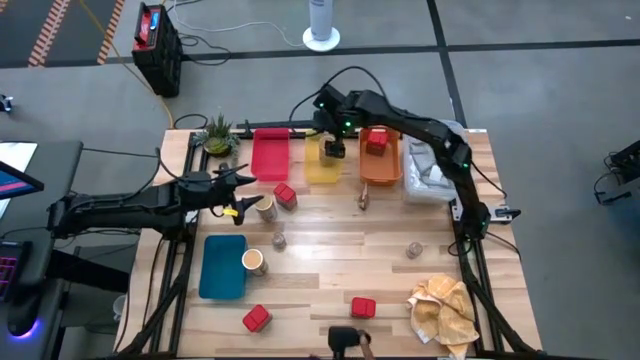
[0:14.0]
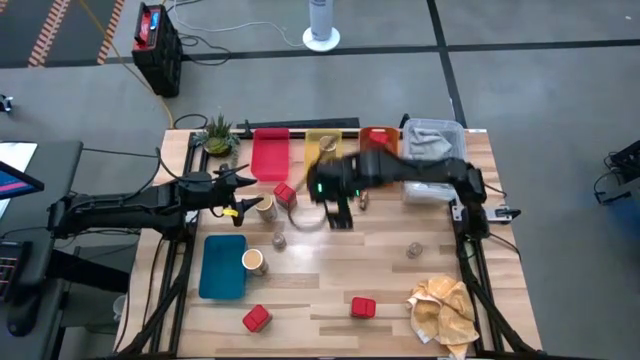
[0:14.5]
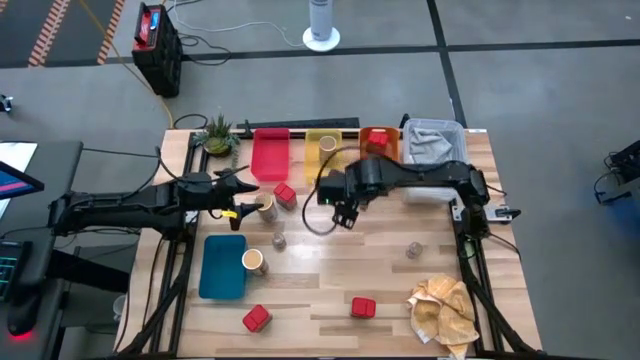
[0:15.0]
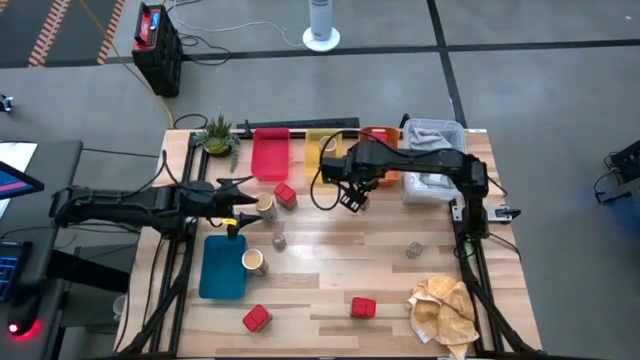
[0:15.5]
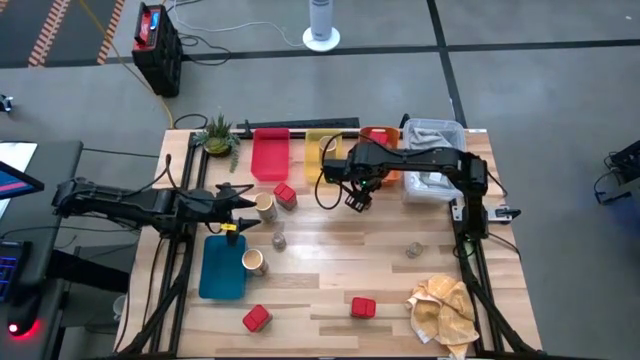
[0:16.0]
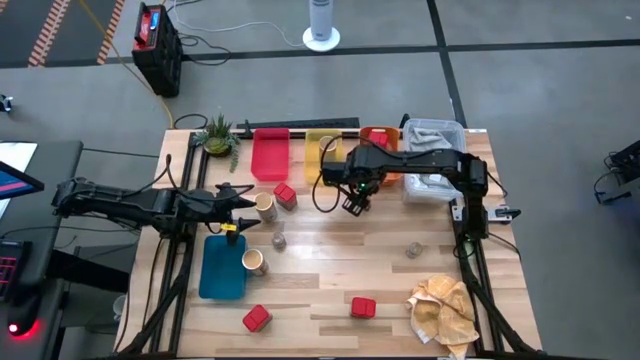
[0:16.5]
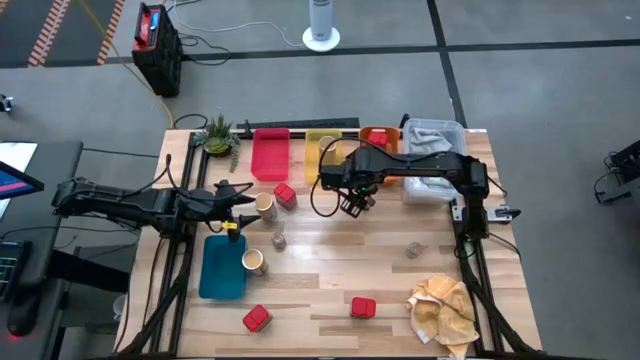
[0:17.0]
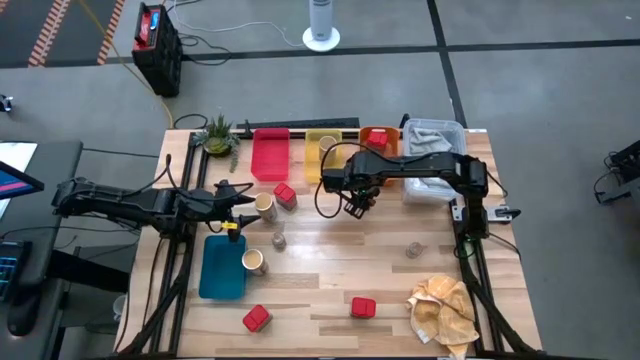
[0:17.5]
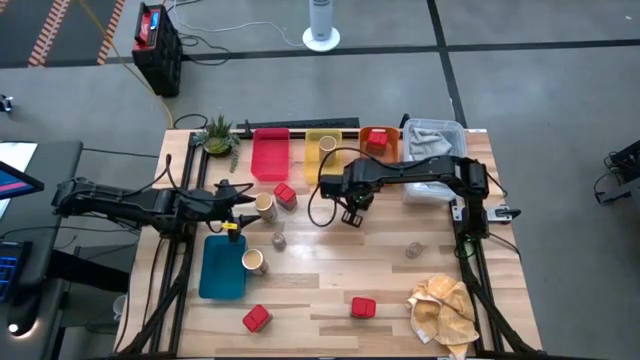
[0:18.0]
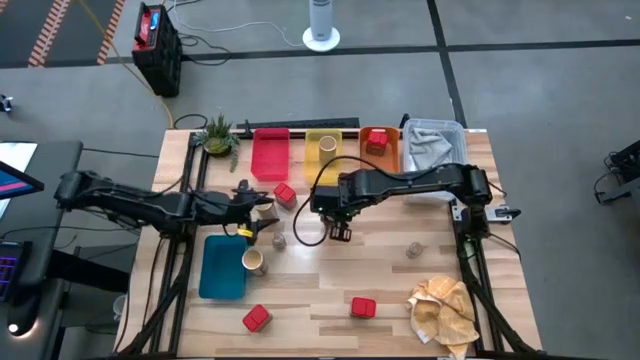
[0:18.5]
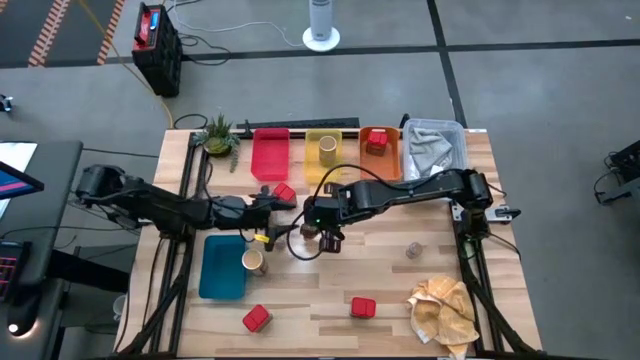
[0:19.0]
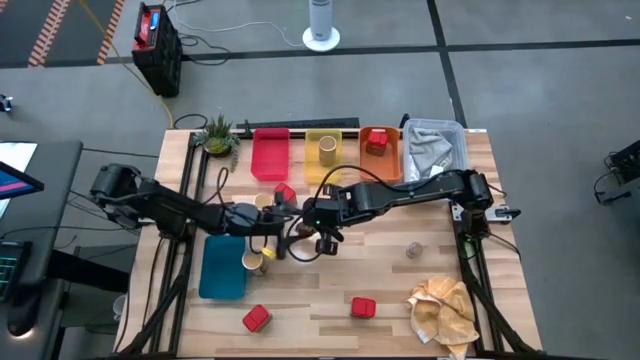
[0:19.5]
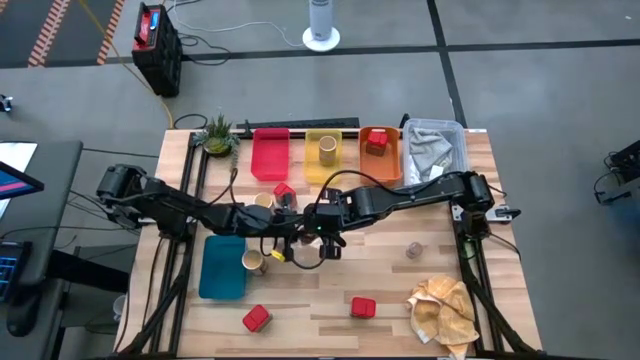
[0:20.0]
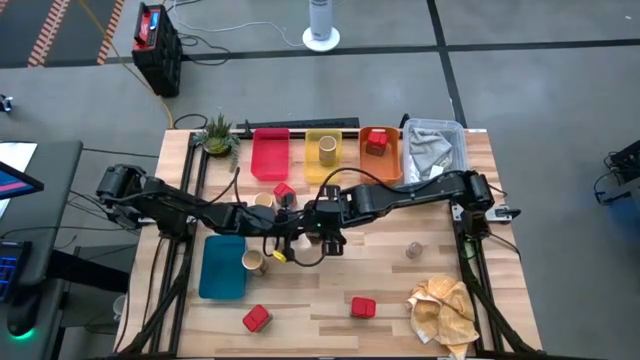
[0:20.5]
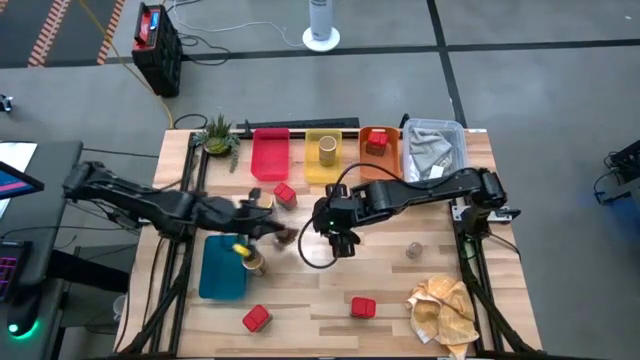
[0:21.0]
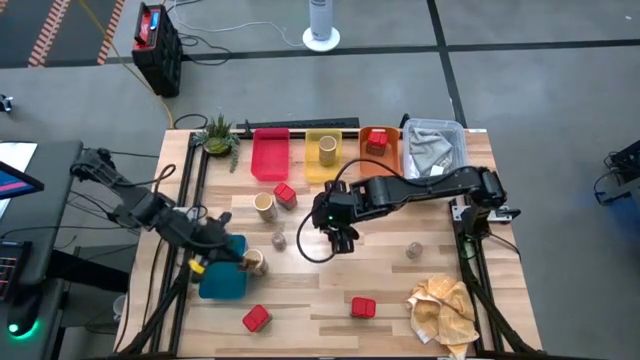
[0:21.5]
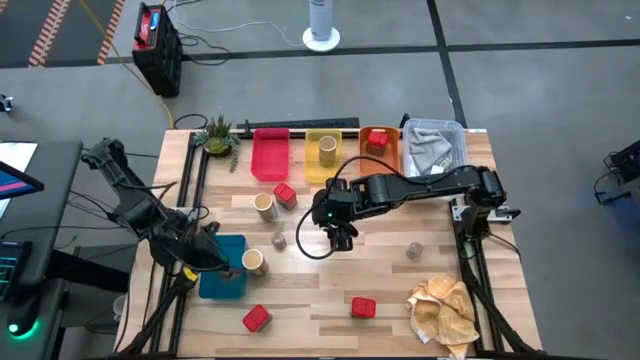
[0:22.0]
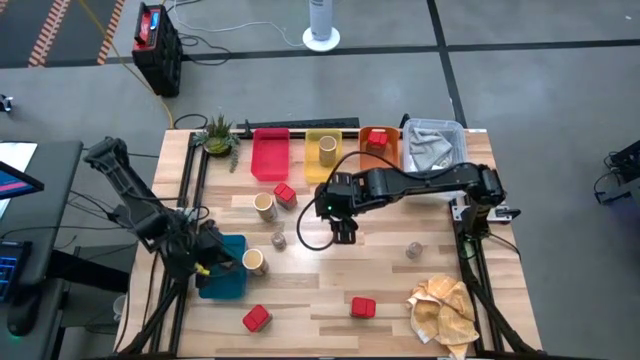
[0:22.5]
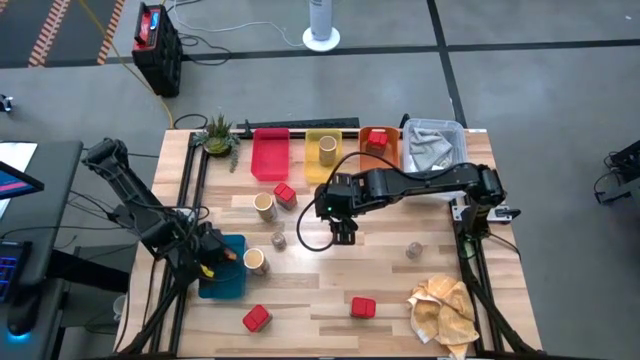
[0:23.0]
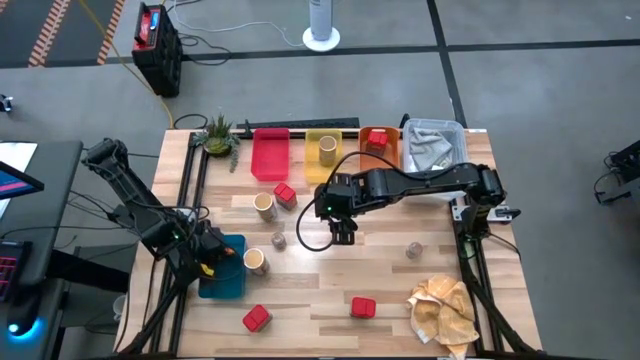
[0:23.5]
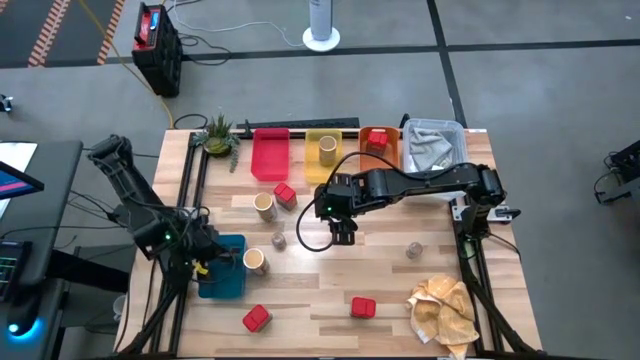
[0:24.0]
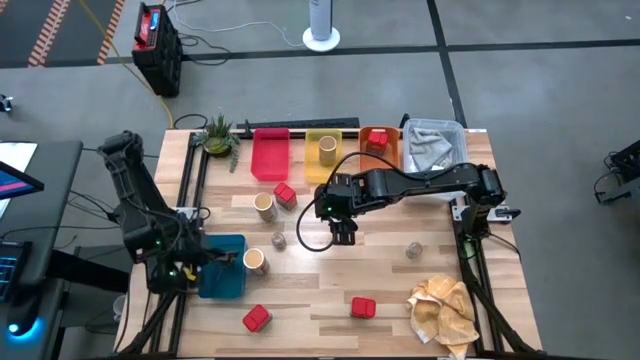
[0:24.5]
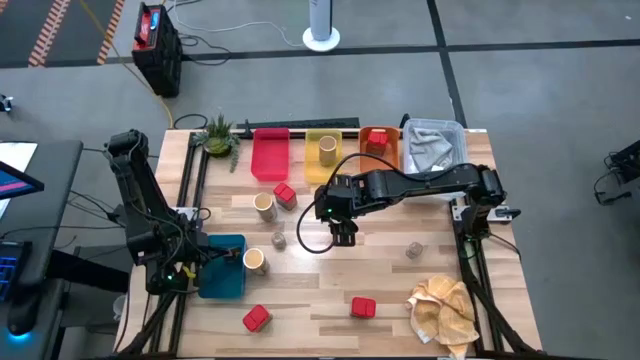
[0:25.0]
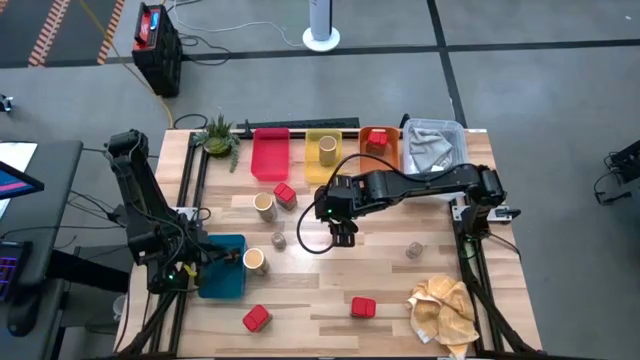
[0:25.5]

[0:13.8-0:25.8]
Task: Sort spices by type
Put the orange seasoning bag into the blue bin

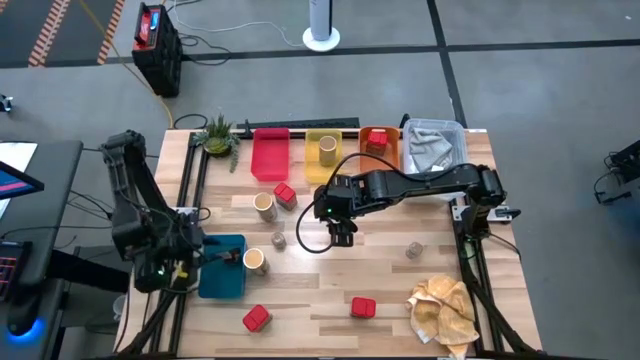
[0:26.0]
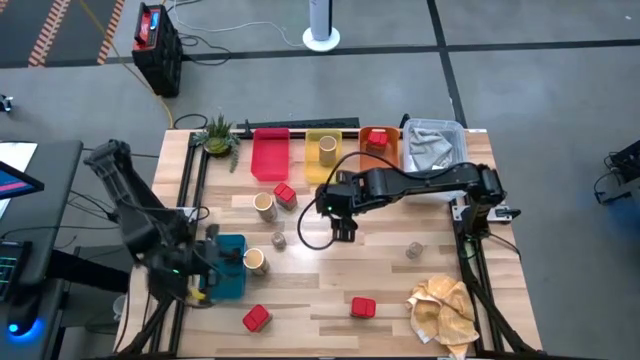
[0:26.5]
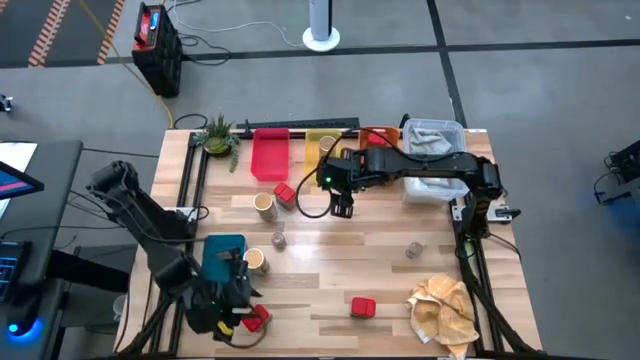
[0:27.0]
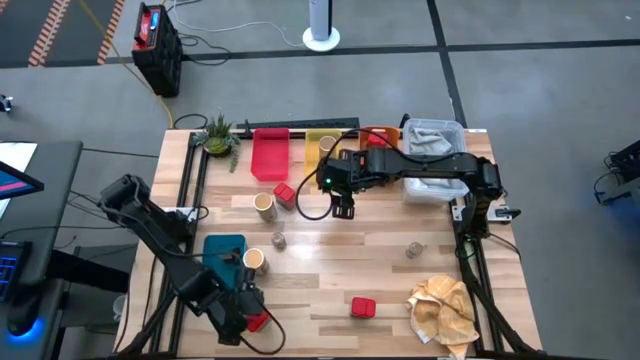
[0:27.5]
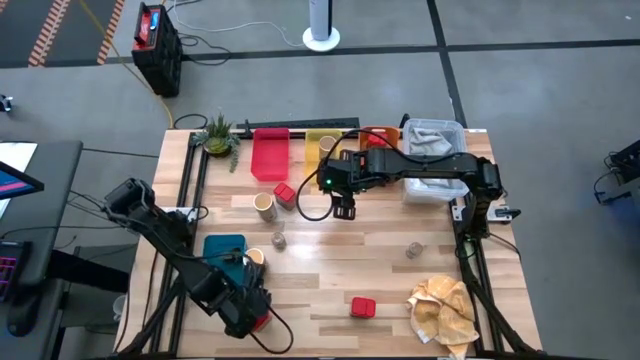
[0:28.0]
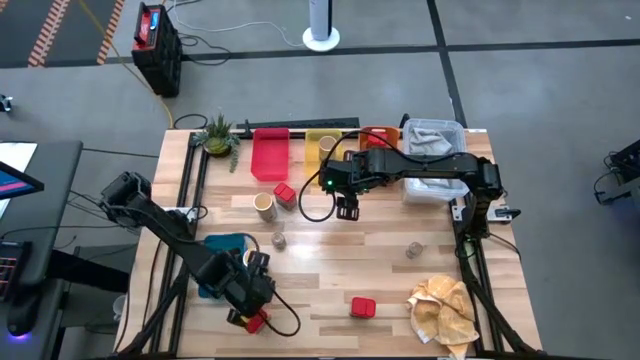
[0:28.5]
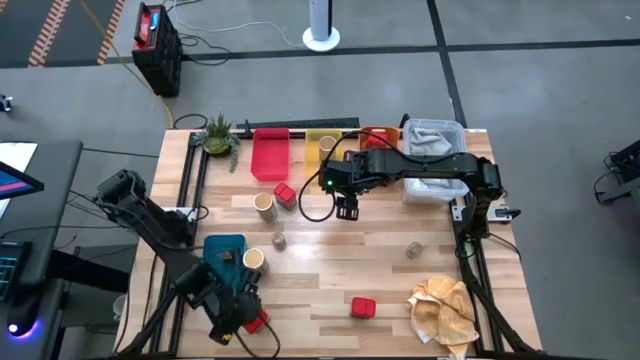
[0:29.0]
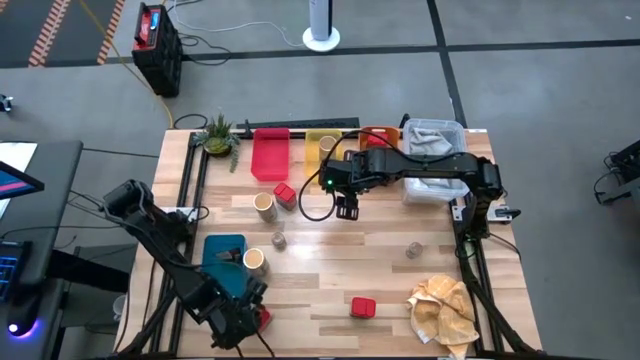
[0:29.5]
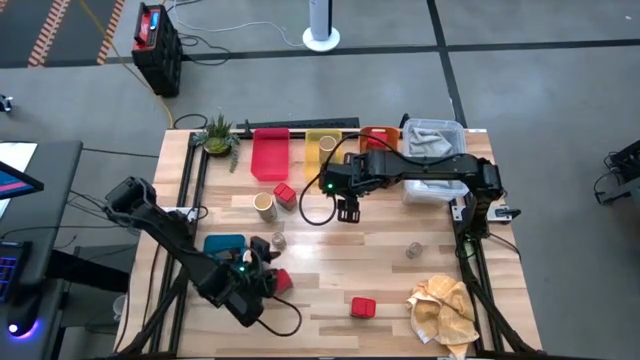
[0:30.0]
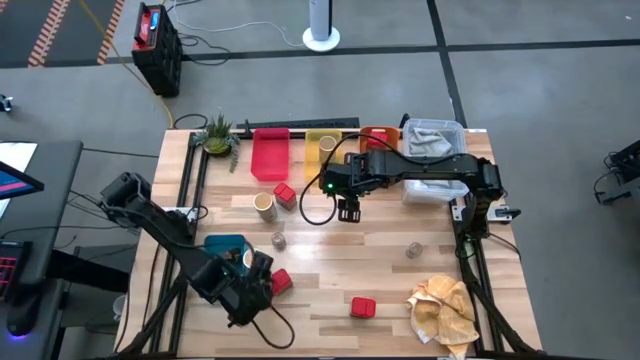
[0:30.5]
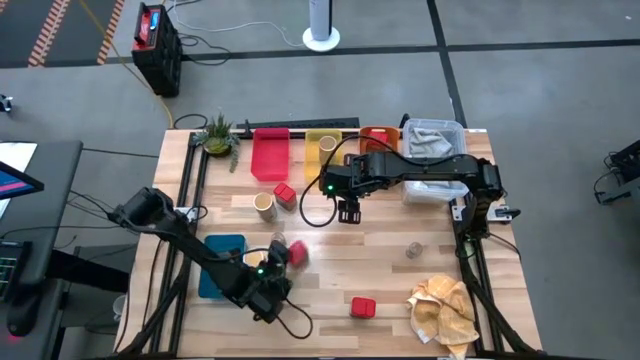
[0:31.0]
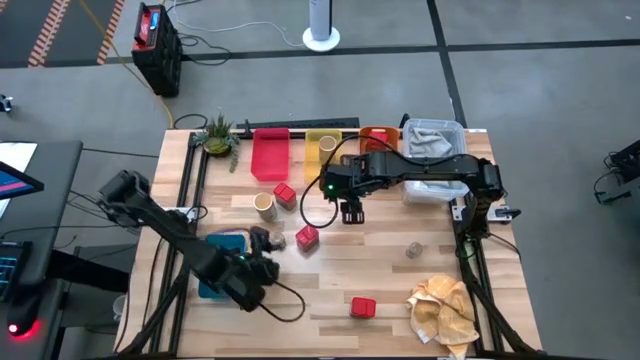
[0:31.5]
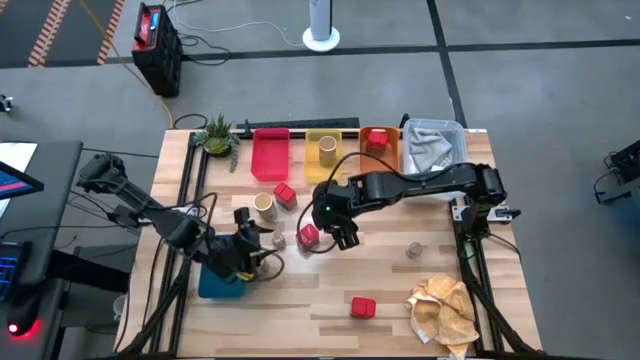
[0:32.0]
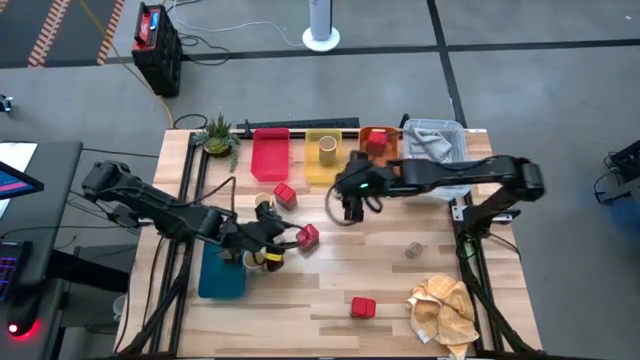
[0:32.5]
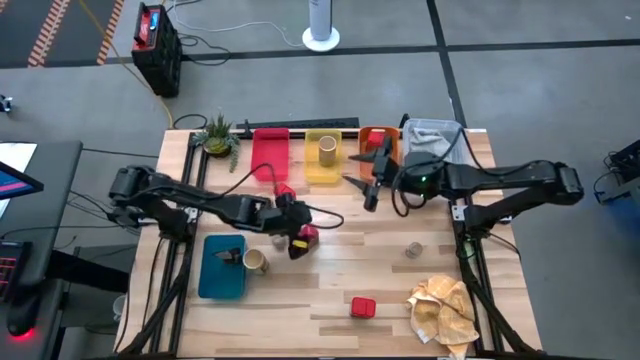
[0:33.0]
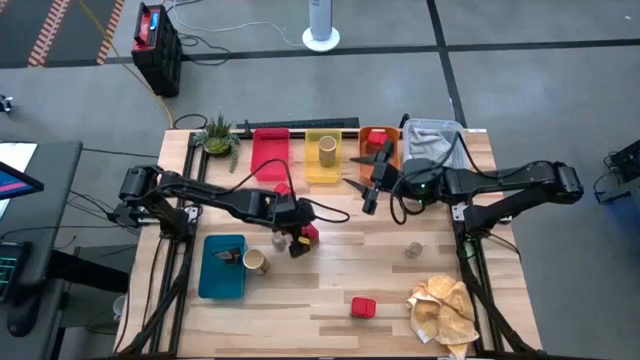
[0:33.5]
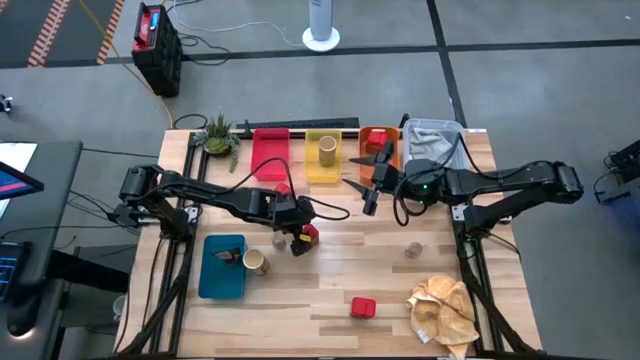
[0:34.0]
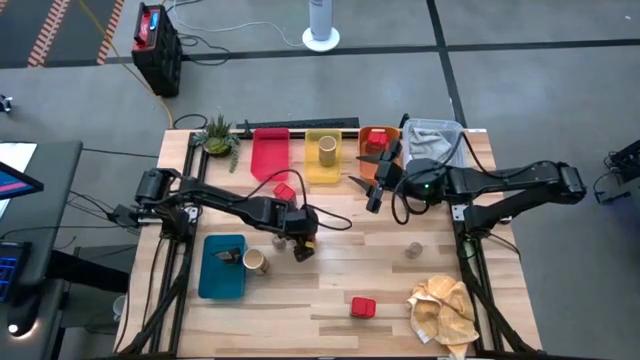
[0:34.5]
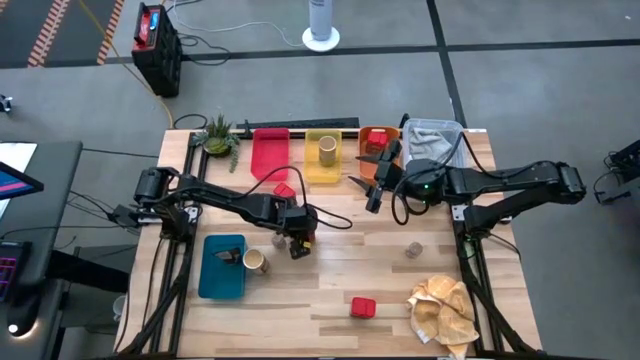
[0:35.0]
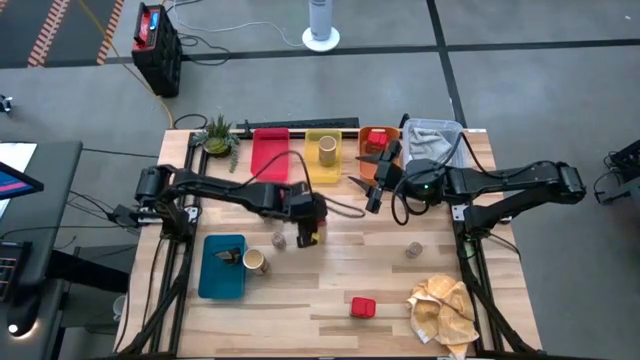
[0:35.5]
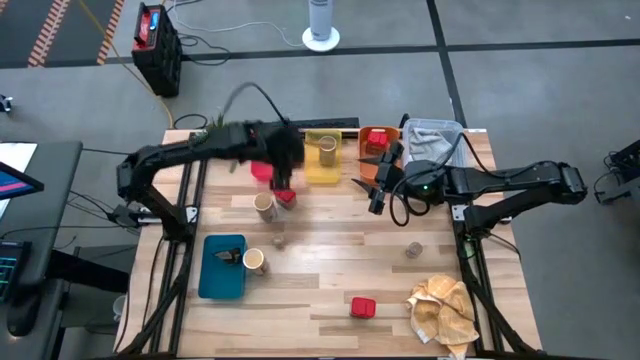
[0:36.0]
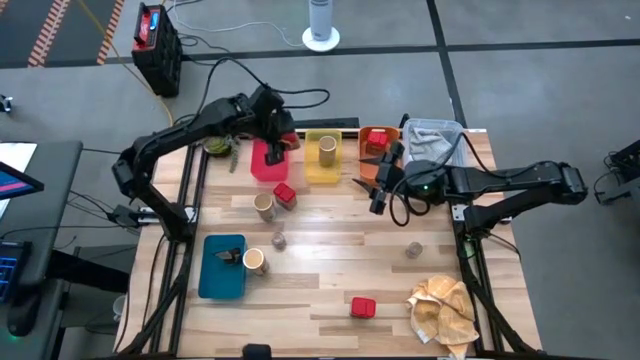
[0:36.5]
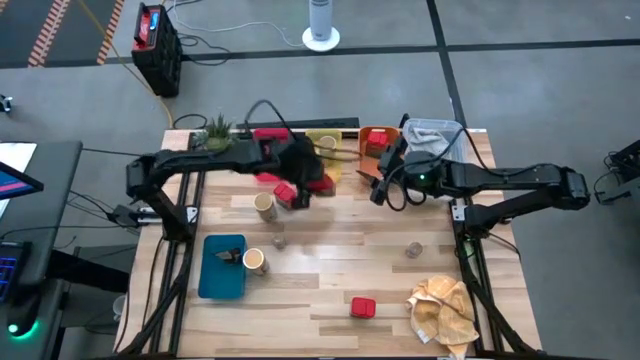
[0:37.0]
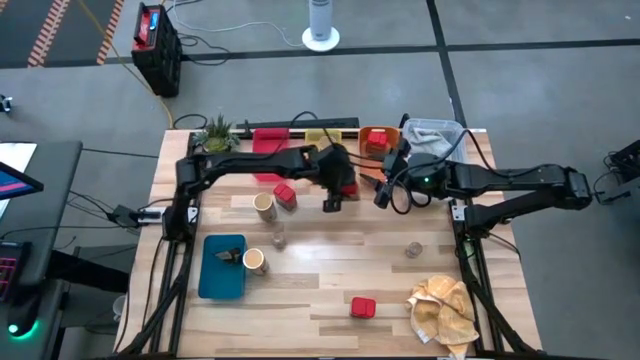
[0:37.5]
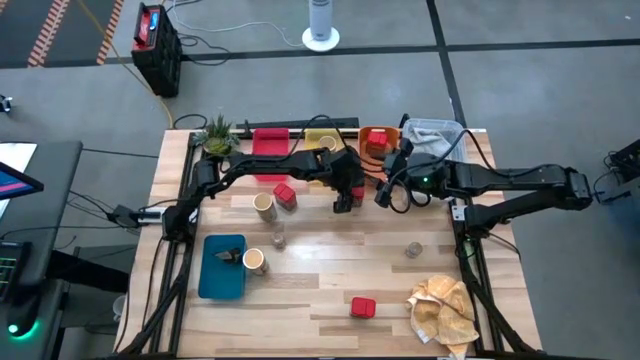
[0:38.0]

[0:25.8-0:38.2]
Put the red seasoning can into the orange bin
